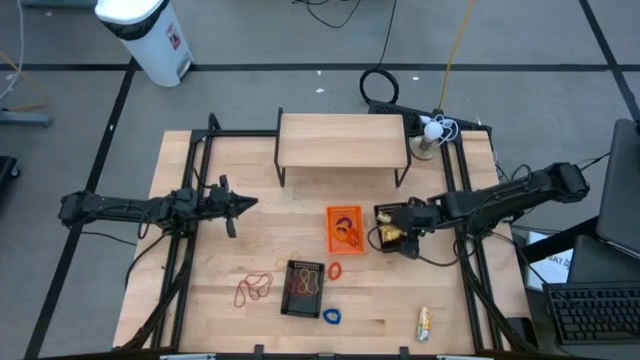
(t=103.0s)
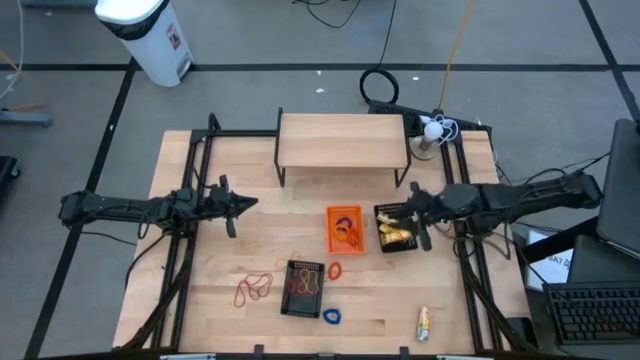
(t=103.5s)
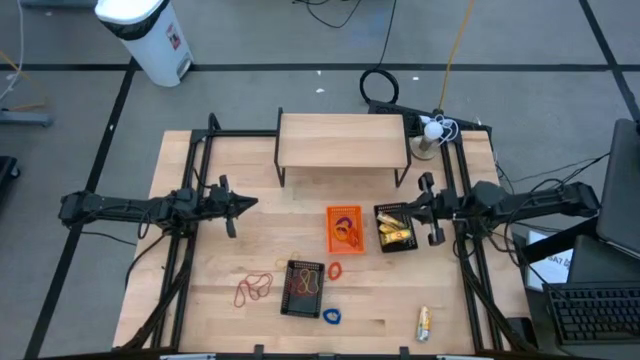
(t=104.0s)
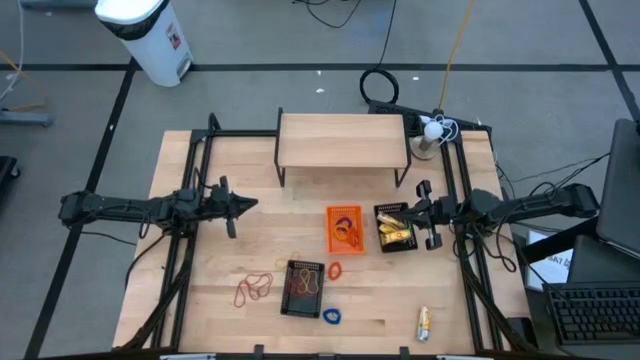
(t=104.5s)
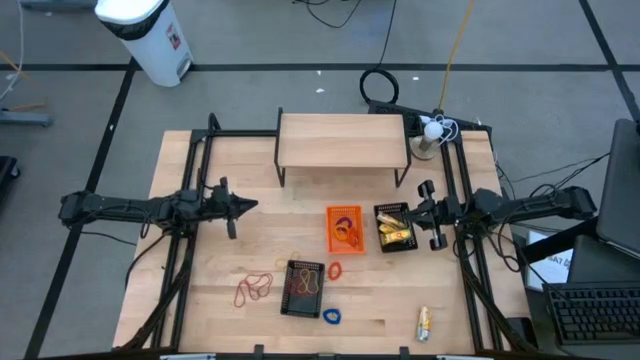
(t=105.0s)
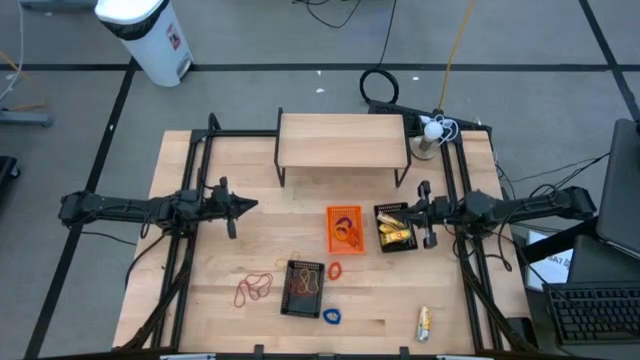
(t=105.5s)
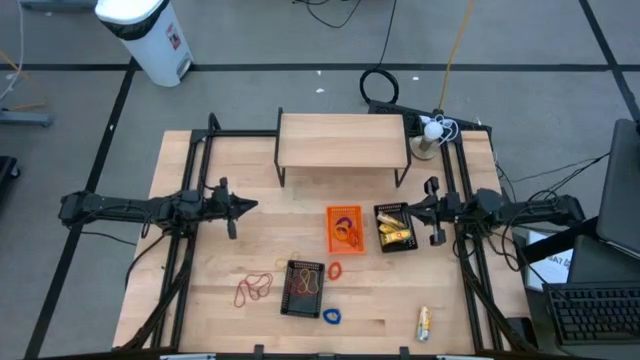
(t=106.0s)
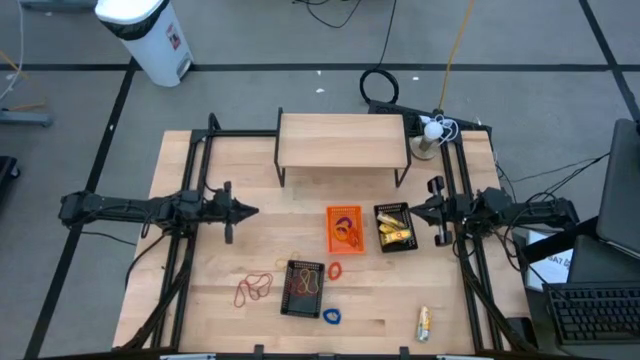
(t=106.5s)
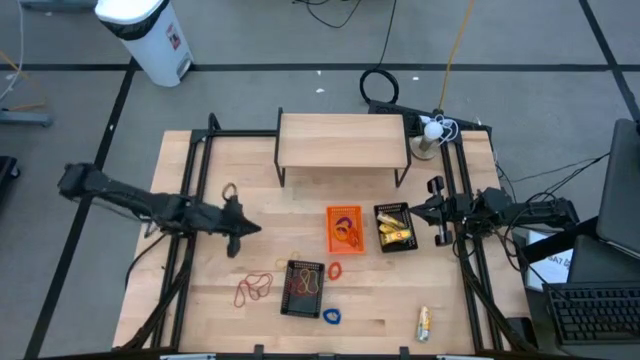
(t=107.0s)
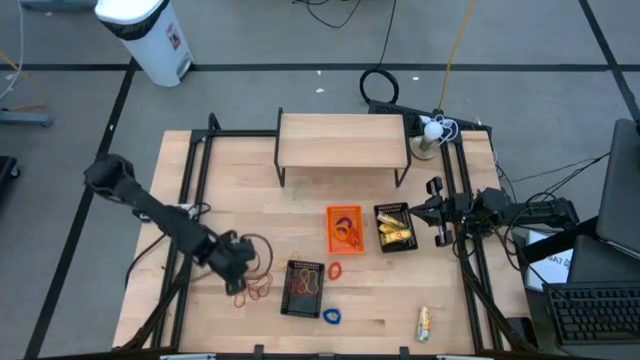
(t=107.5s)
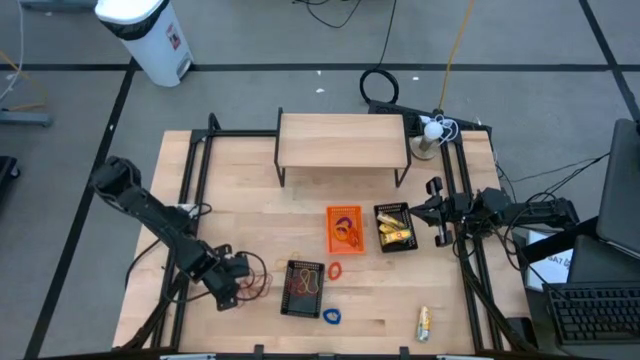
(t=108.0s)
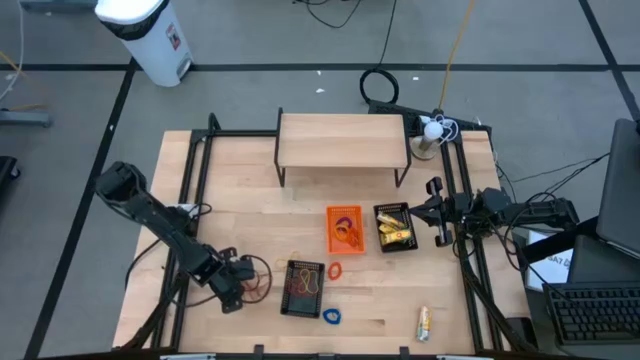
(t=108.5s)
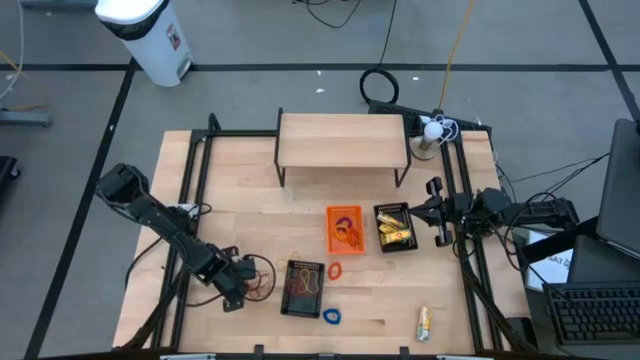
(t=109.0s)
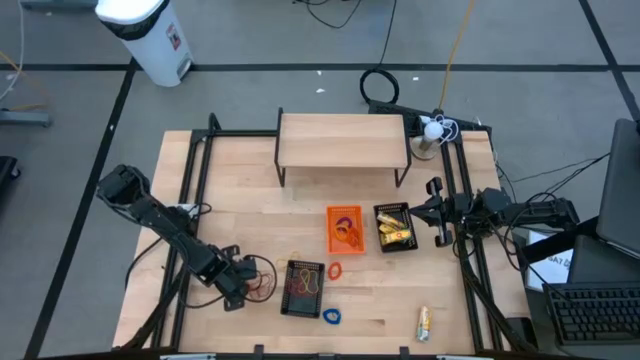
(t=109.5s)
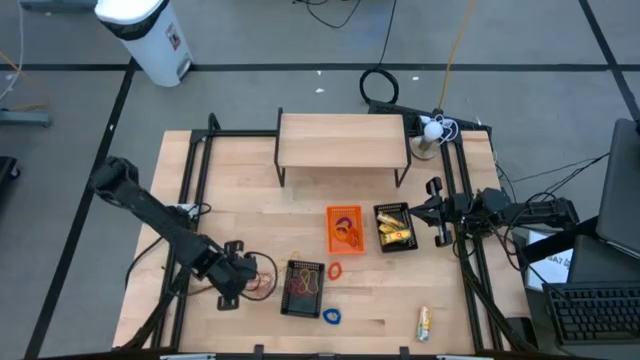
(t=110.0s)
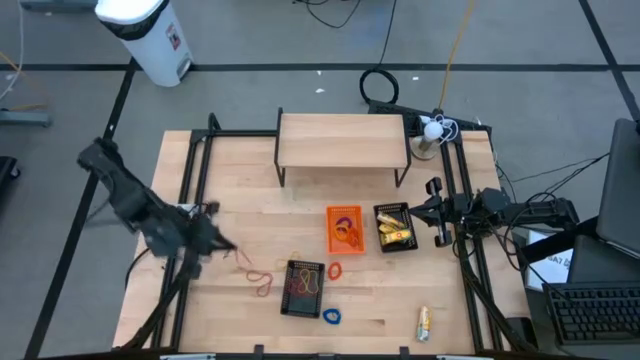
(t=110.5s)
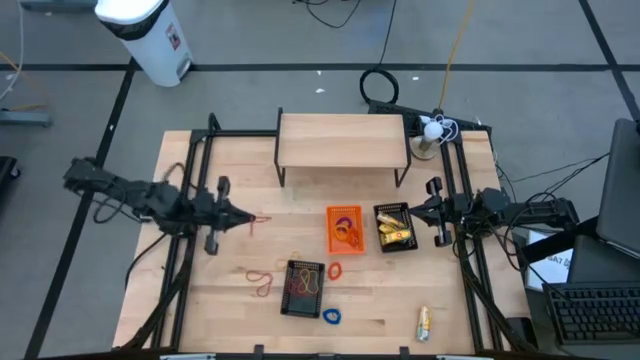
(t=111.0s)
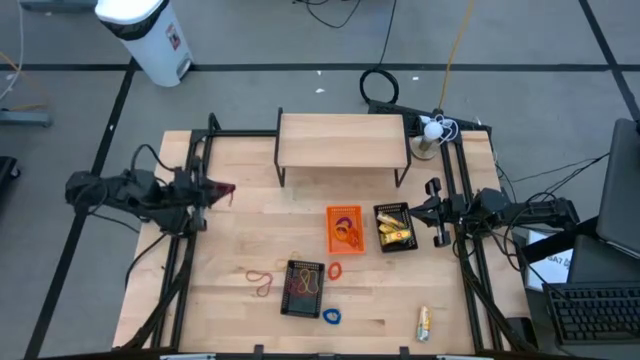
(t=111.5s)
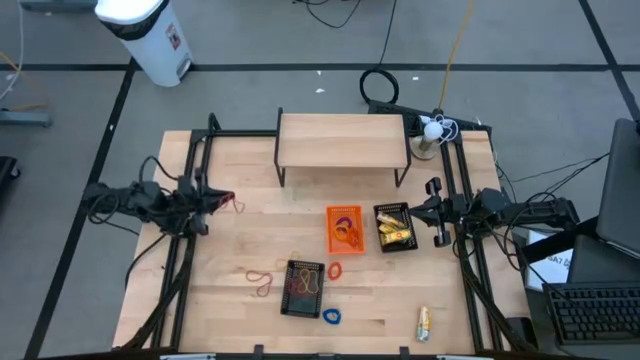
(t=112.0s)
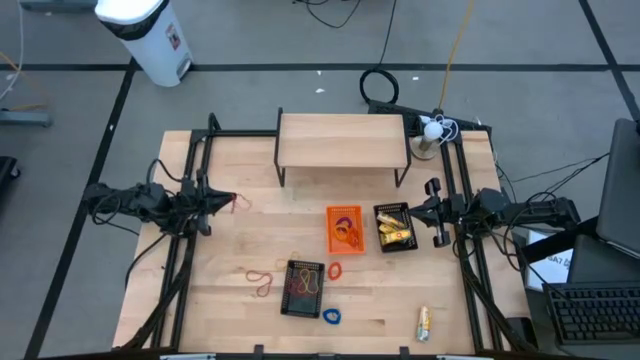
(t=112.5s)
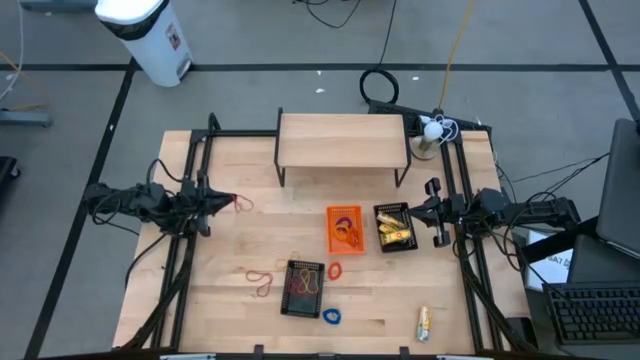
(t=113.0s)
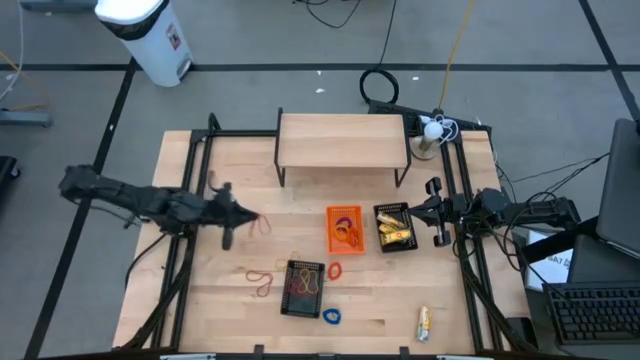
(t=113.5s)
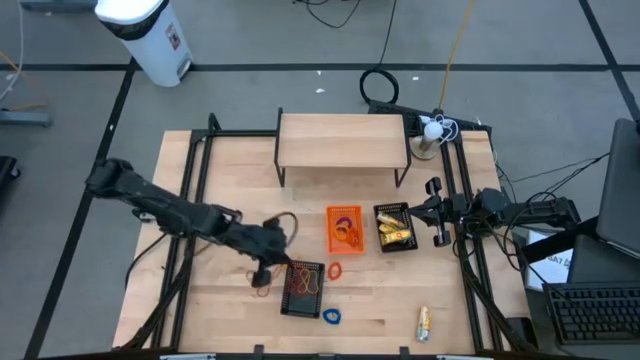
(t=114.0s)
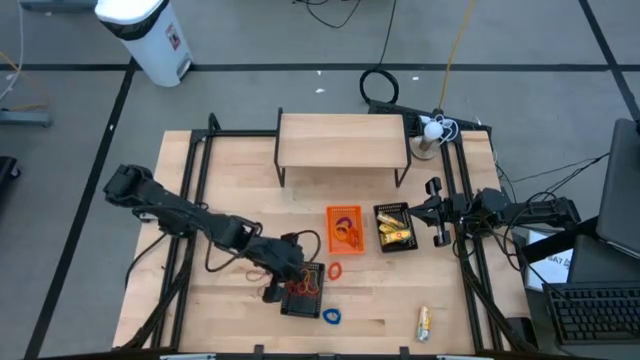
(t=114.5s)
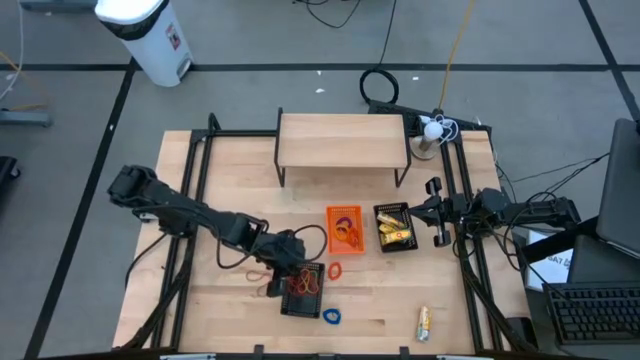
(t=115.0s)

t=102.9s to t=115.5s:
Task: Pick & Place Office Desk Supplies
Put the red rubber band into the bottom black bin

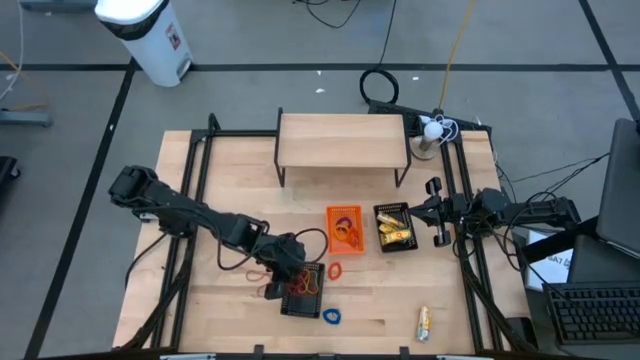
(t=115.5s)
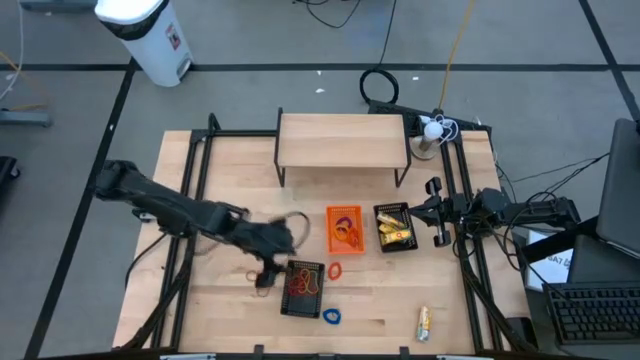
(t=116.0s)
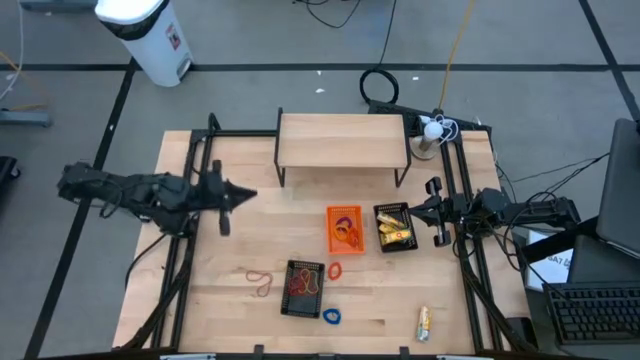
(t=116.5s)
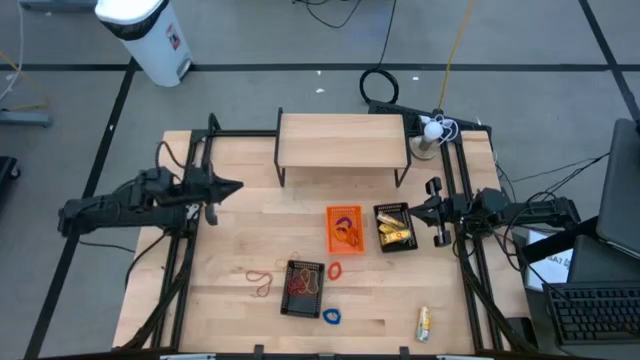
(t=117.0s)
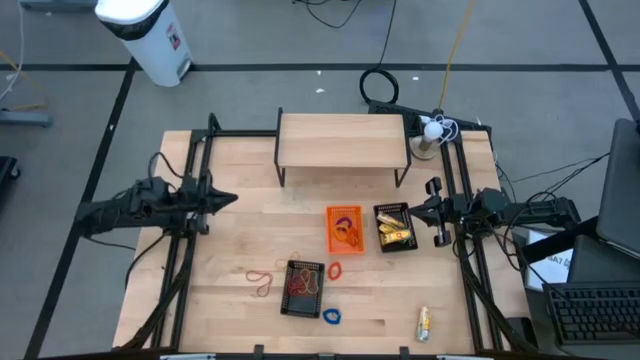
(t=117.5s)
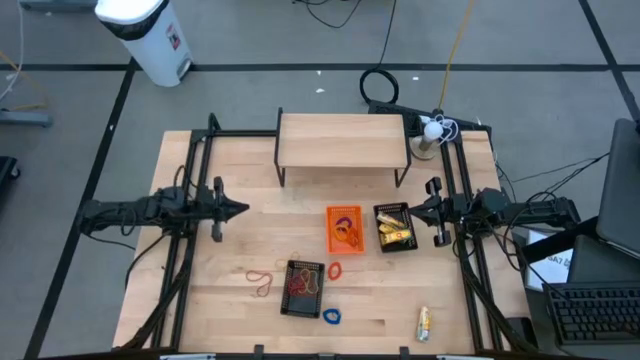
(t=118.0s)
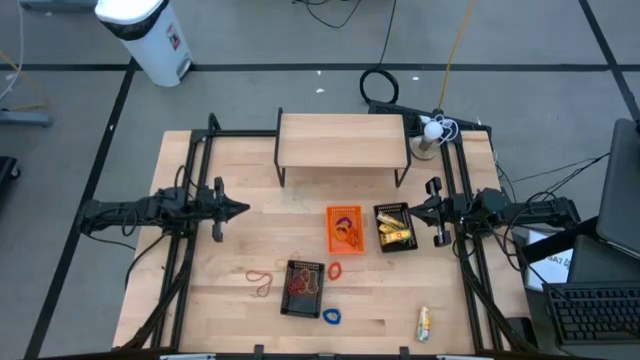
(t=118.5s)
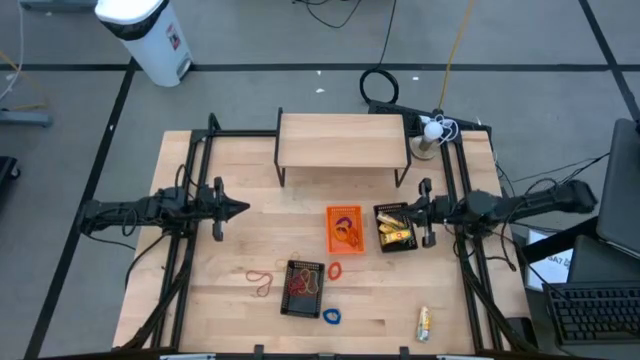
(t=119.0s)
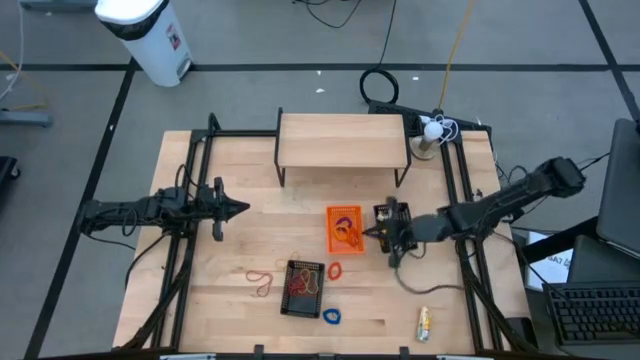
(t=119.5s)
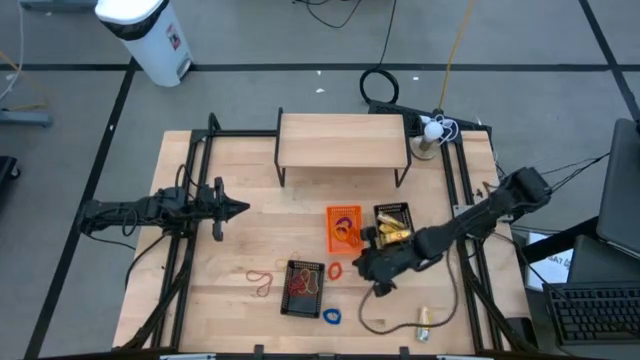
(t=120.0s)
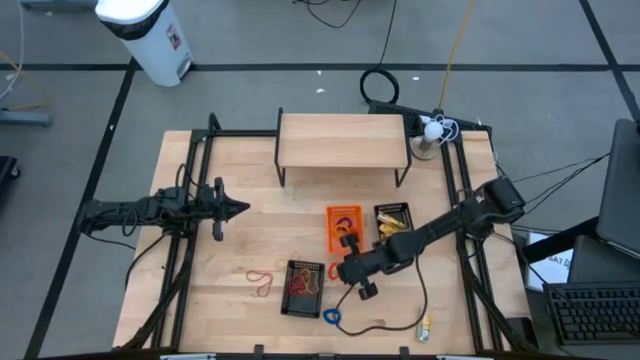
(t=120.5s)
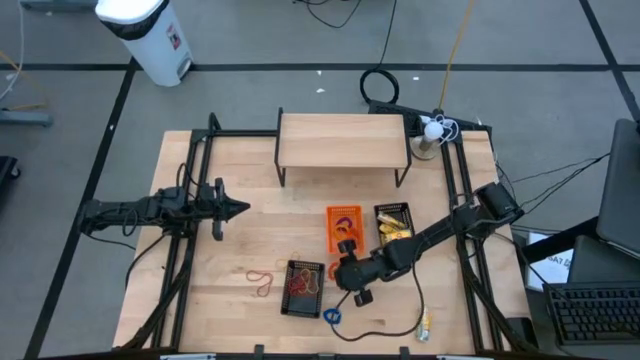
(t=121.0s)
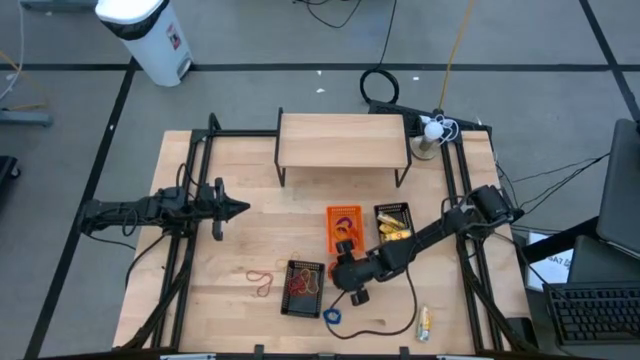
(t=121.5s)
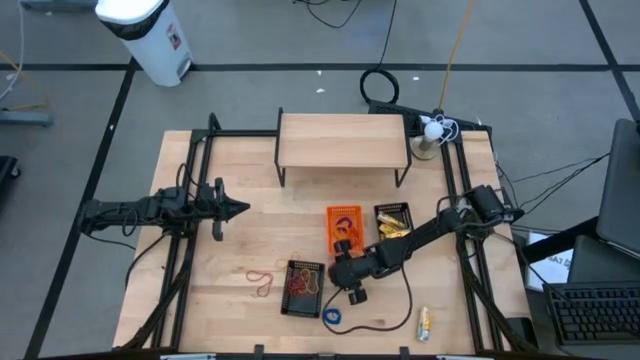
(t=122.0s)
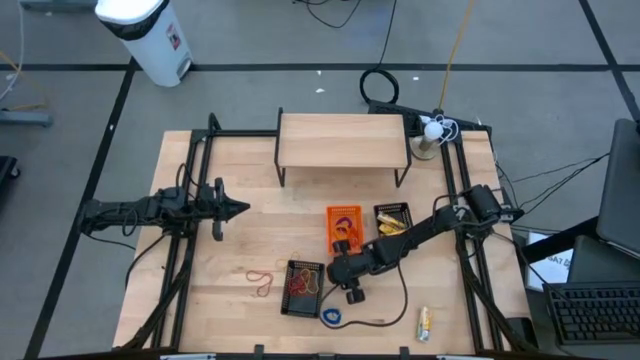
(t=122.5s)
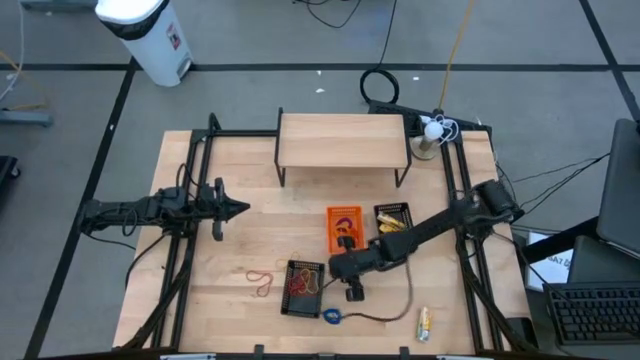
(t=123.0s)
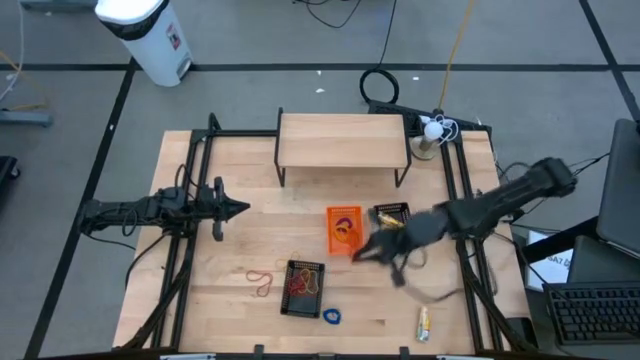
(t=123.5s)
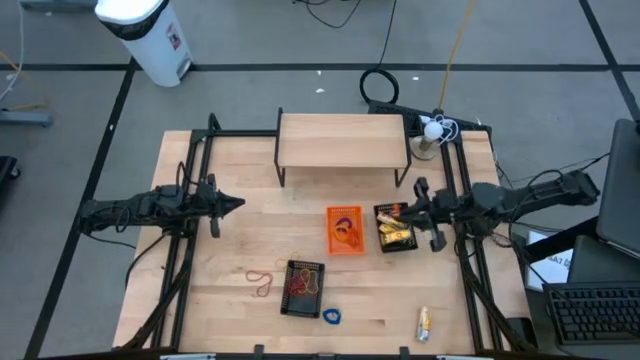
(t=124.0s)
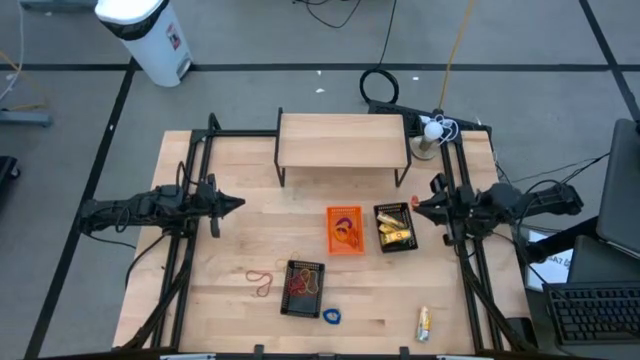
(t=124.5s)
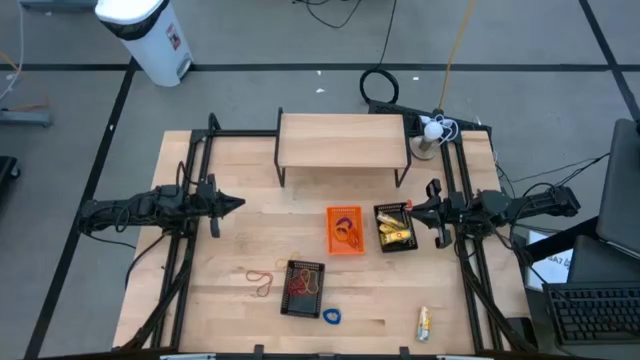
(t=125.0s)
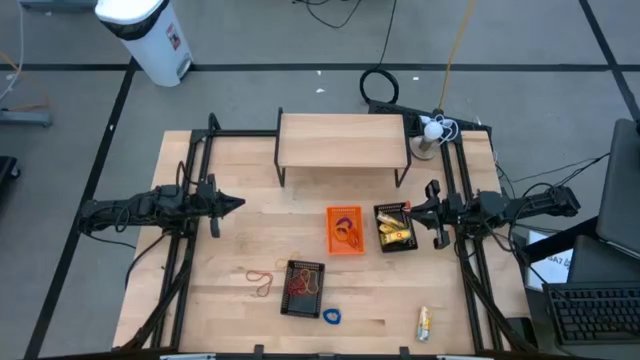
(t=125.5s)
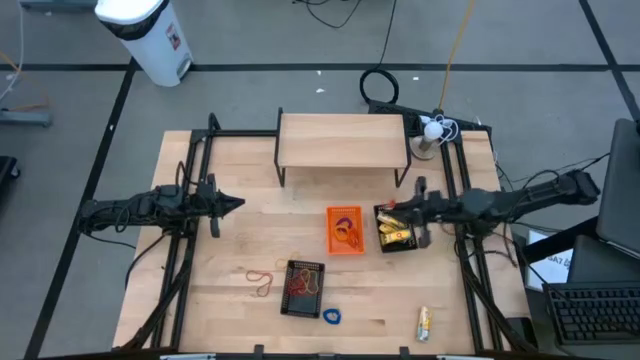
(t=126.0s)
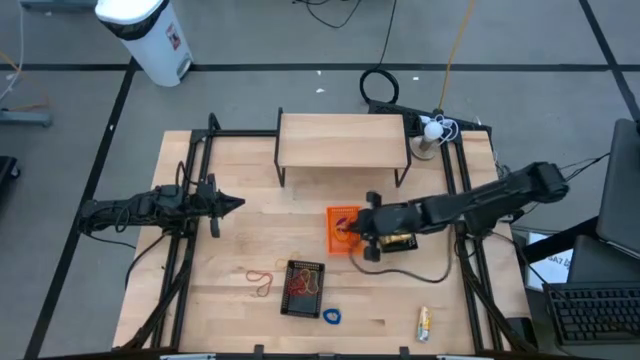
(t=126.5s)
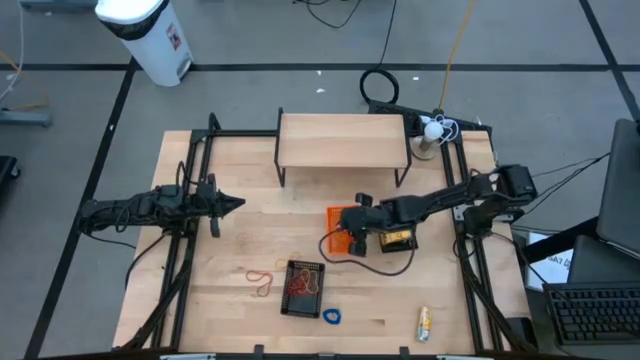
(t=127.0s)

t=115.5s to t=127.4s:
Put the orange spring keychain into the orange bin
